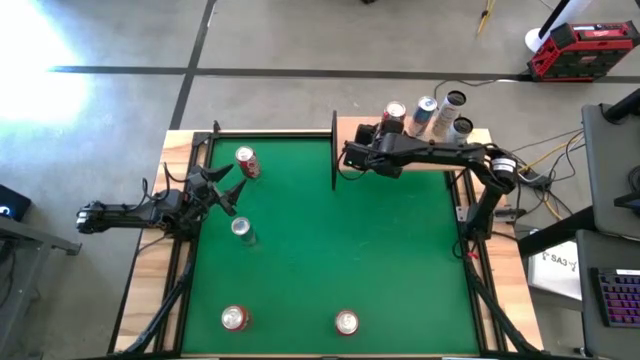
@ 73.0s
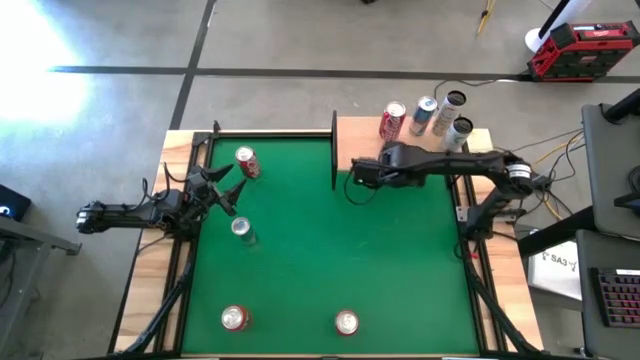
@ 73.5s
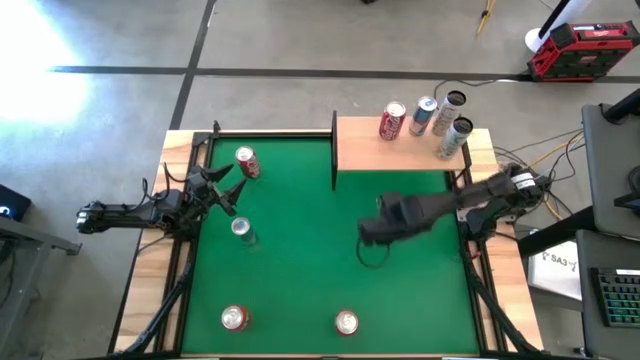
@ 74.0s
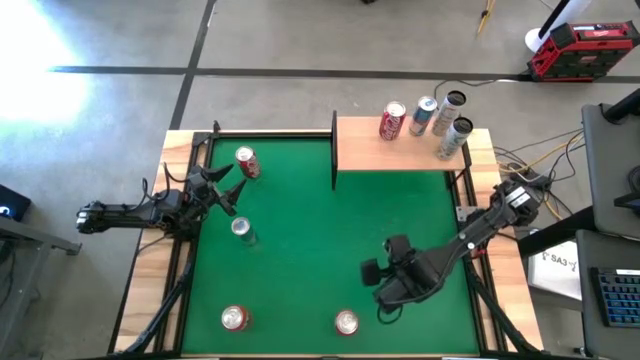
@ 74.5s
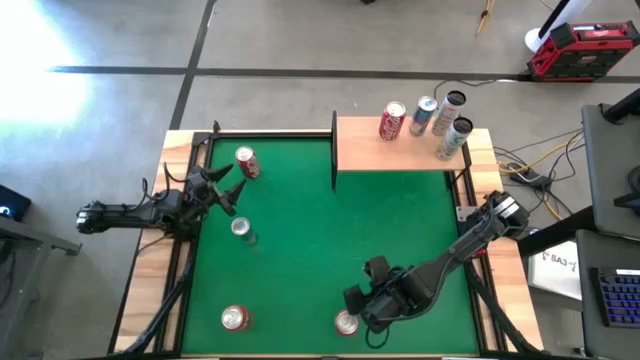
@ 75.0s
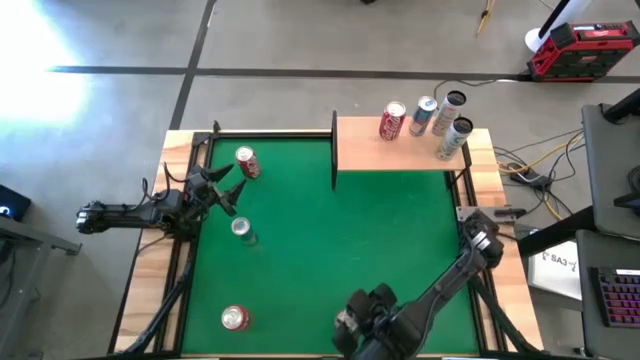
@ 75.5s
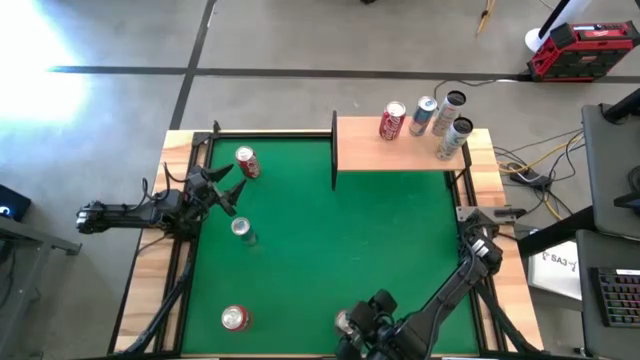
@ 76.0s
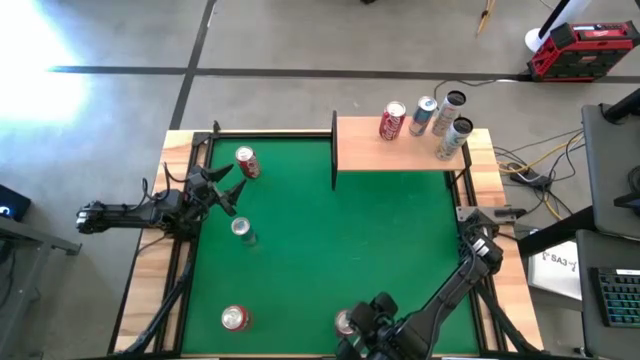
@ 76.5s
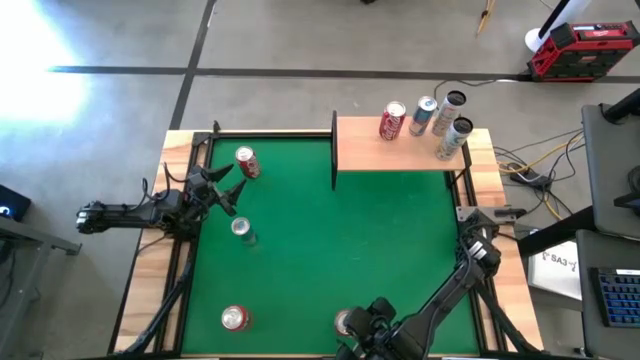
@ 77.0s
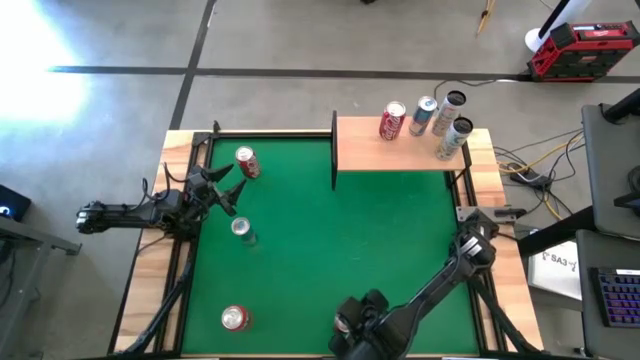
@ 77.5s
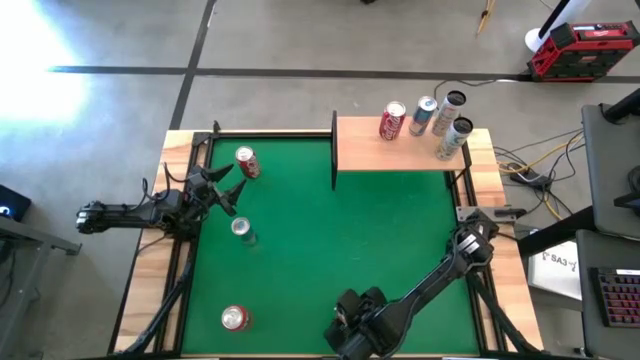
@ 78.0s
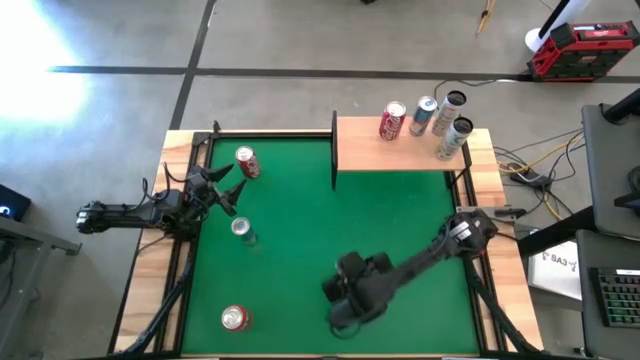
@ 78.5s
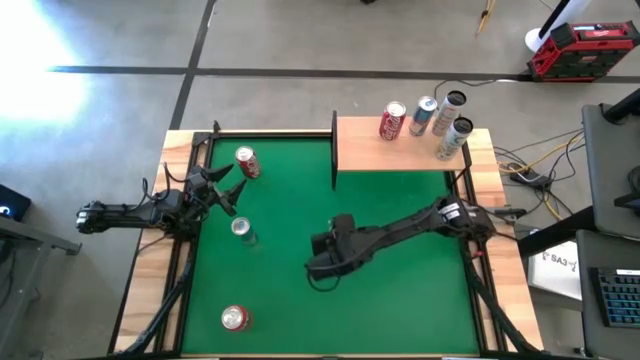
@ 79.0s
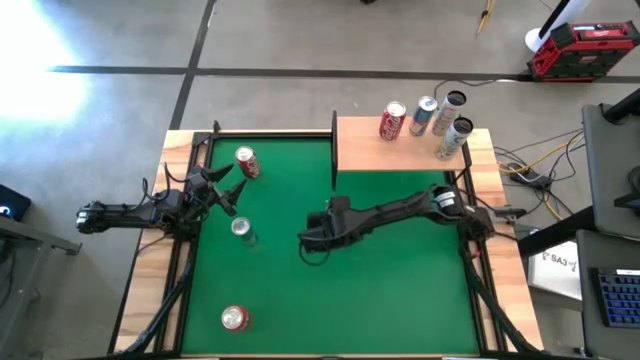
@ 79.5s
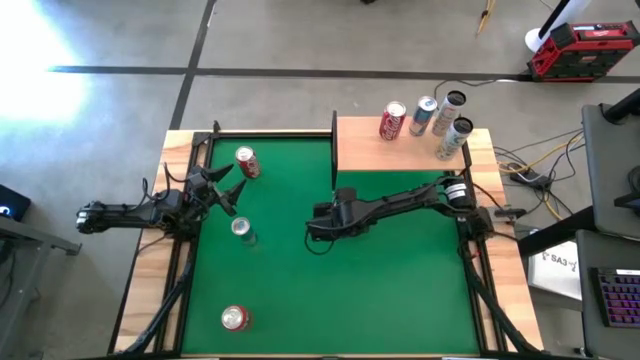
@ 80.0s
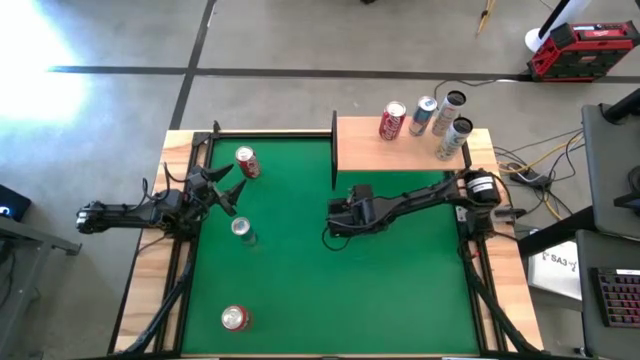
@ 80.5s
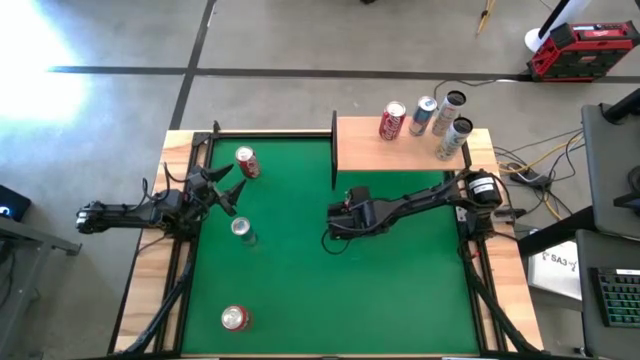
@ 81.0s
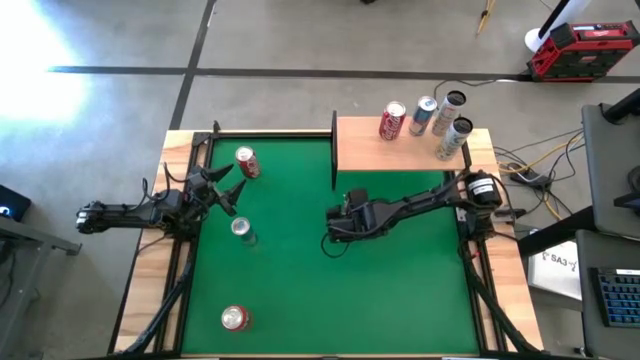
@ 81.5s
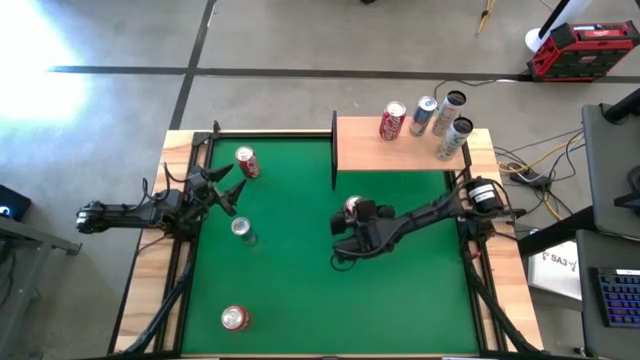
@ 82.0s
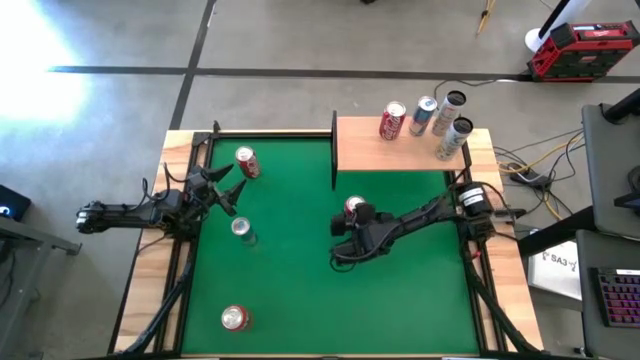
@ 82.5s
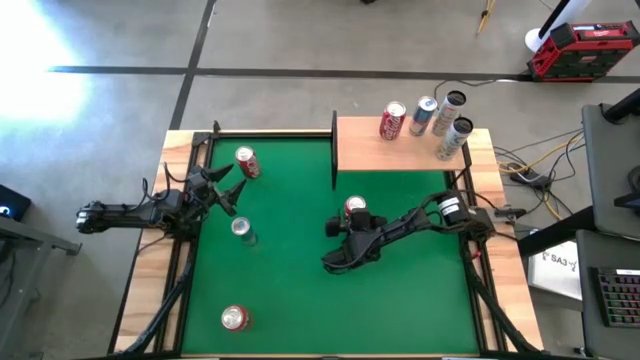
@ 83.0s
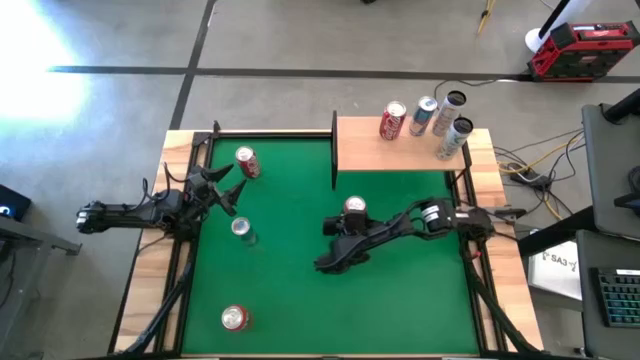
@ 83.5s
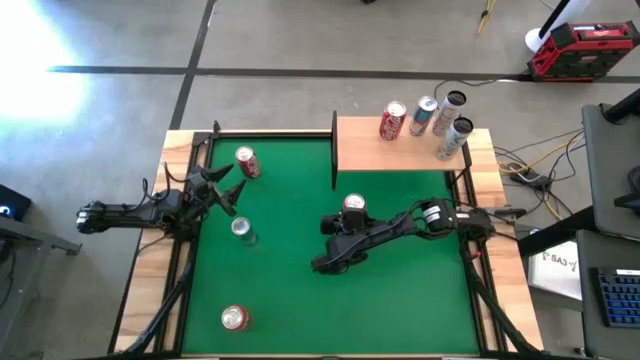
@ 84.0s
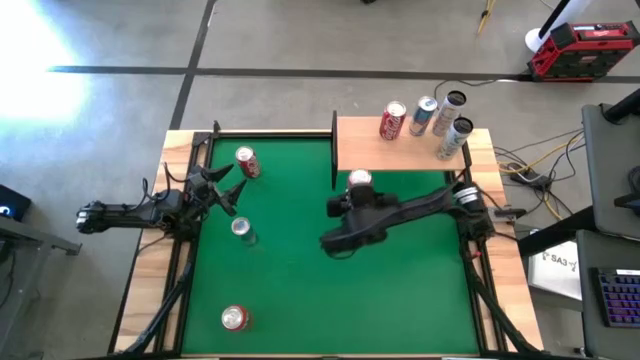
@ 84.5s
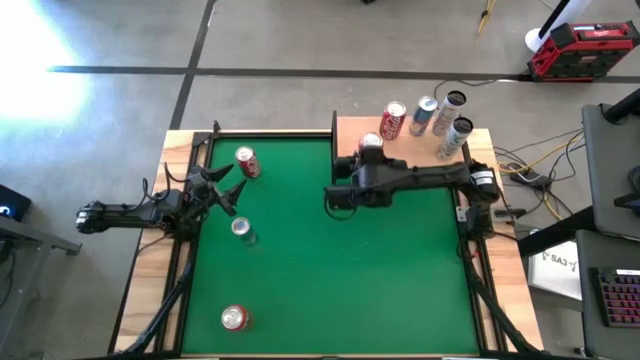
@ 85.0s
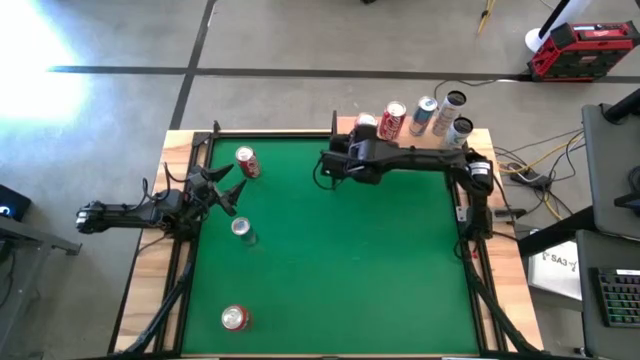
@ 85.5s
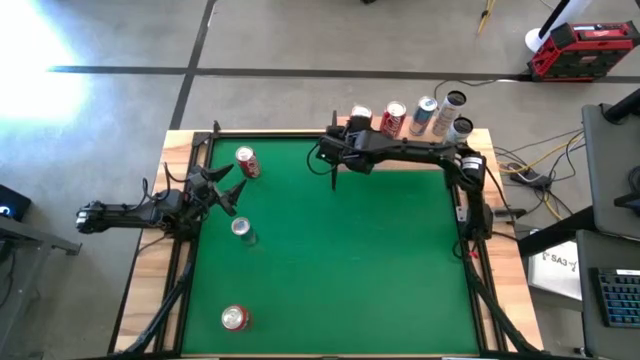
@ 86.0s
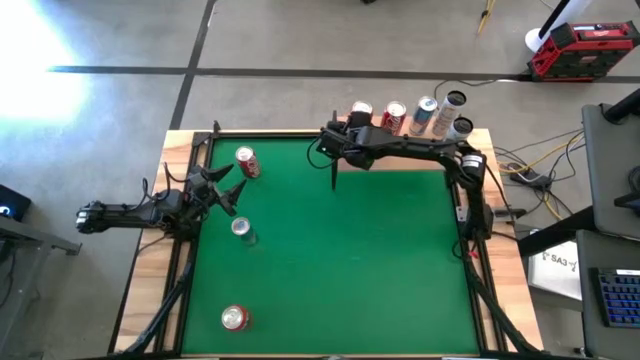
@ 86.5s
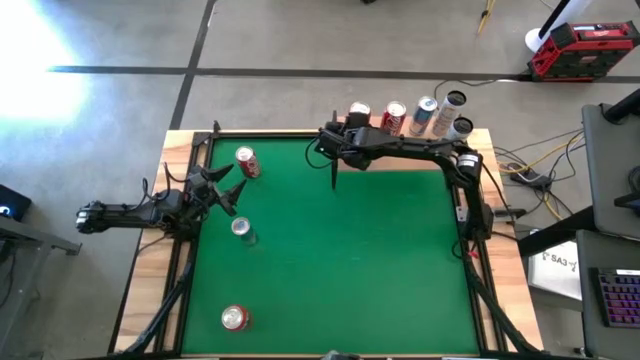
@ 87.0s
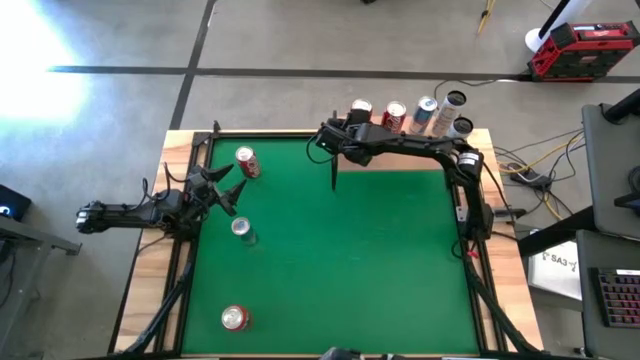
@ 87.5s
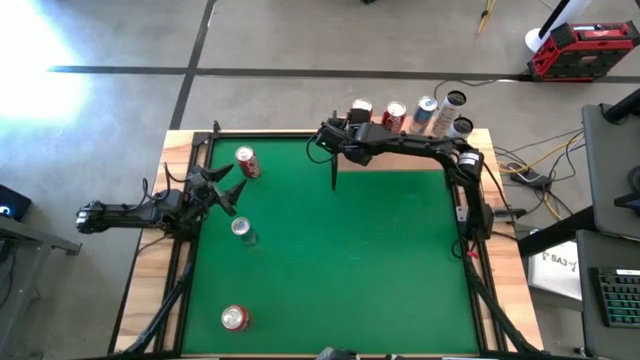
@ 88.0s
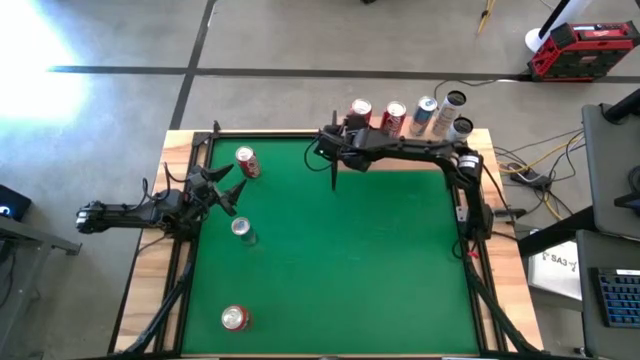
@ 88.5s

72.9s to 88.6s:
Task: Place canned beverage on shelf
Put the right red soda can on the shelf

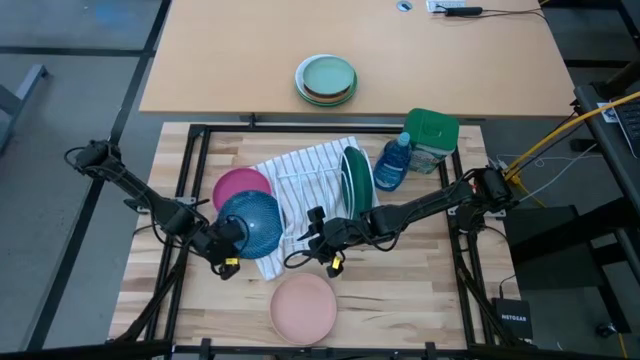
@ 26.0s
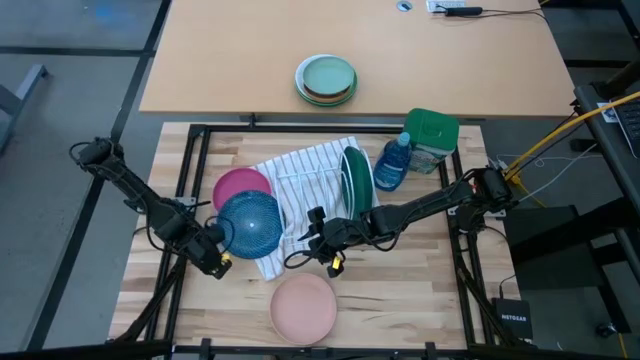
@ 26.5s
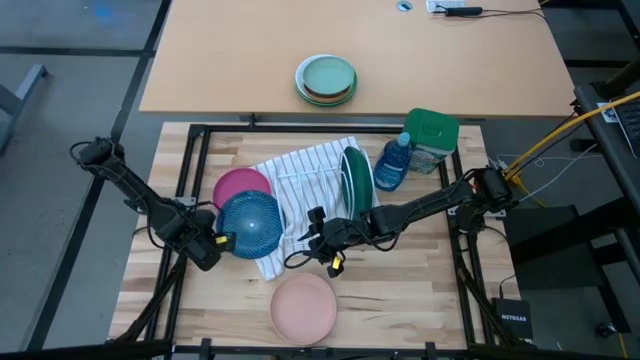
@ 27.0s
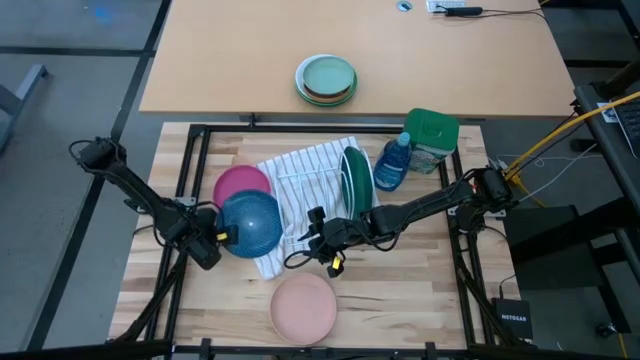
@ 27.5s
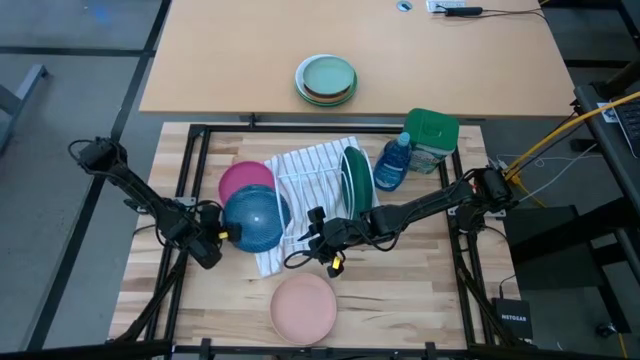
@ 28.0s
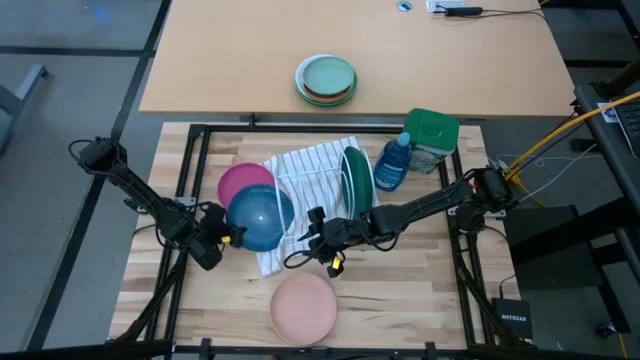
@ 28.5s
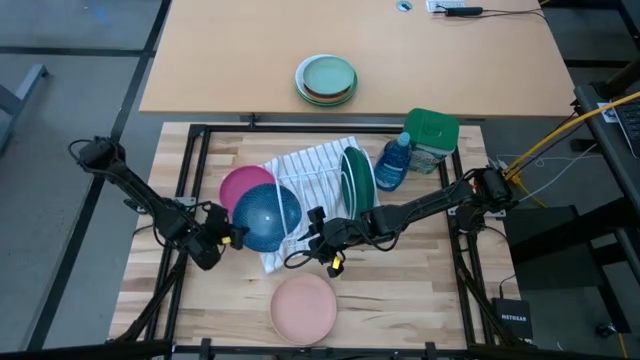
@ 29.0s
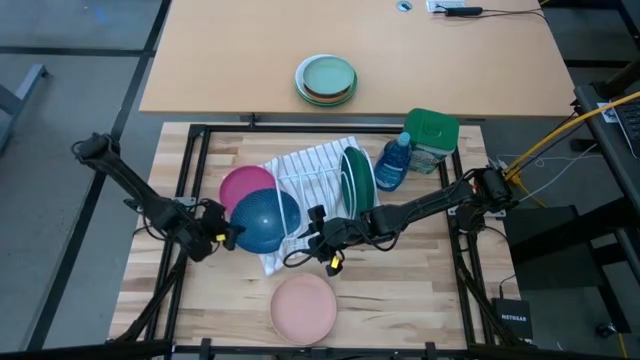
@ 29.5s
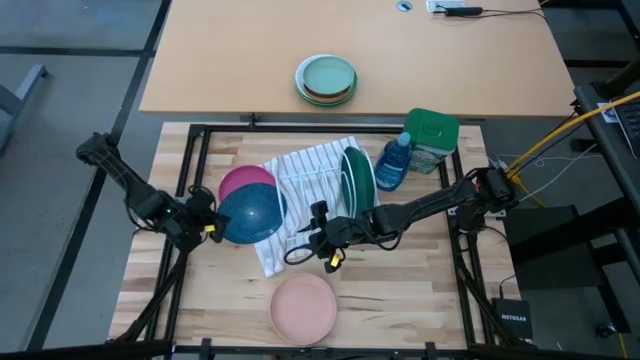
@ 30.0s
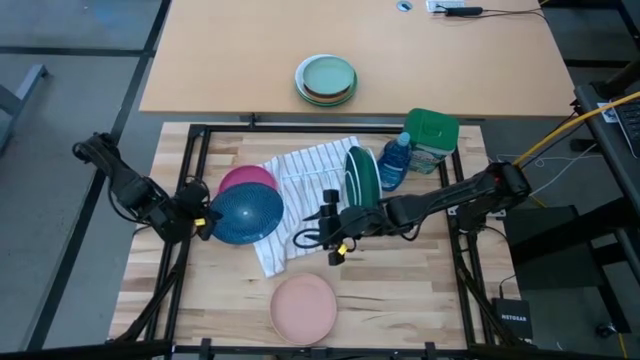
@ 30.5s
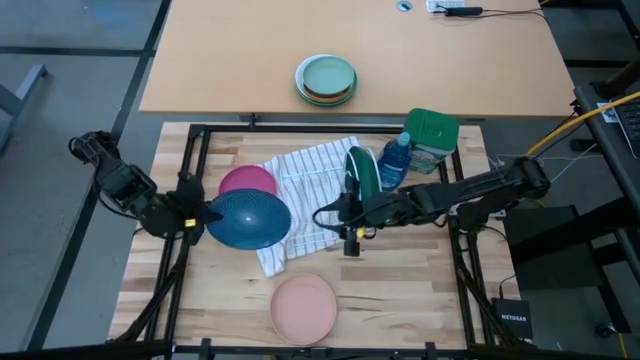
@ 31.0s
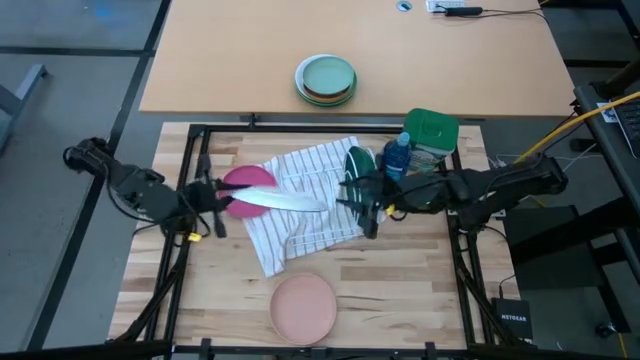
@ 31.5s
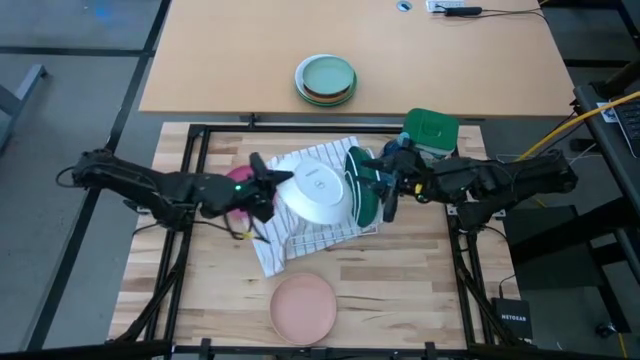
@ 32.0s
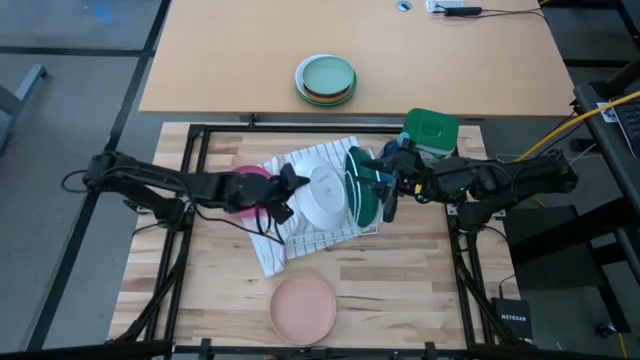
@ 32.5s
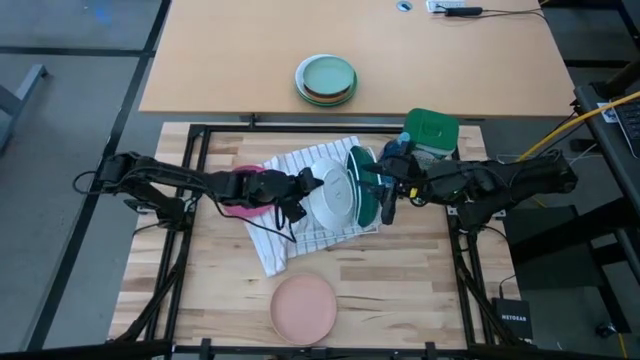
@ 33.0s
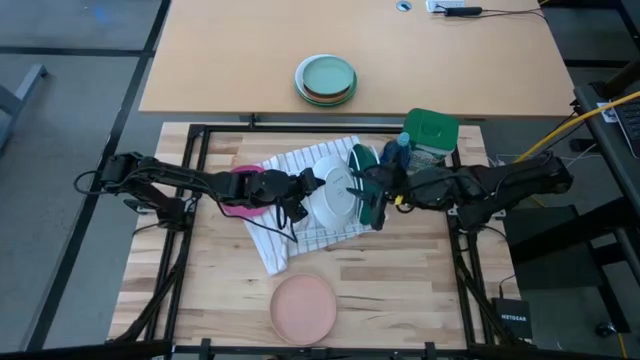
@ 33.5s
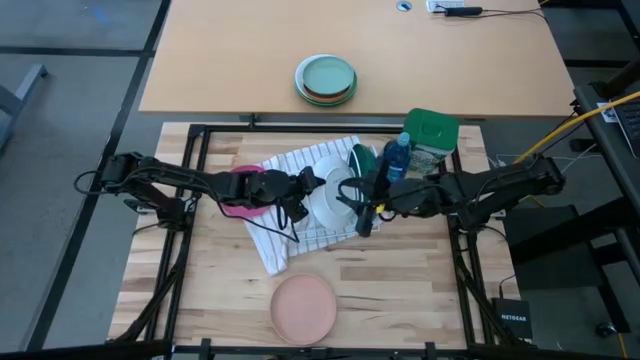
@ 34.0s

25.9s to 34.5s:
Task: Sort dishes
Put the blue plate in the dish rack
